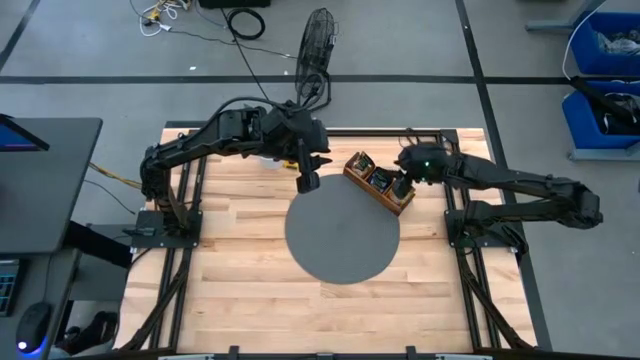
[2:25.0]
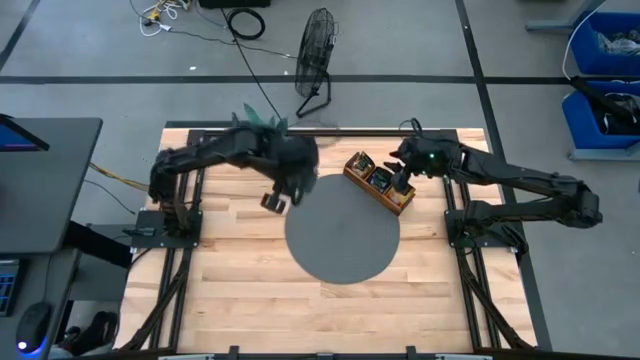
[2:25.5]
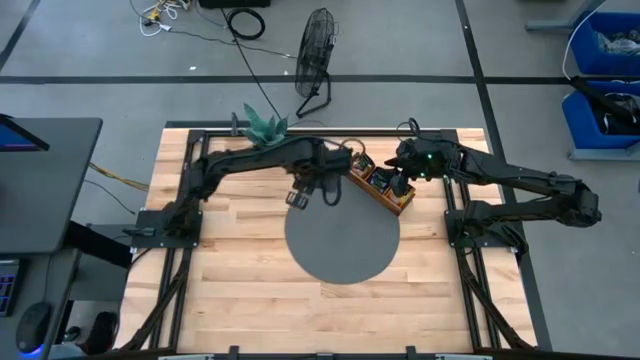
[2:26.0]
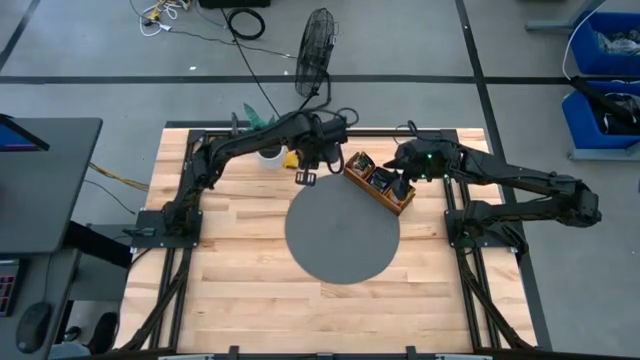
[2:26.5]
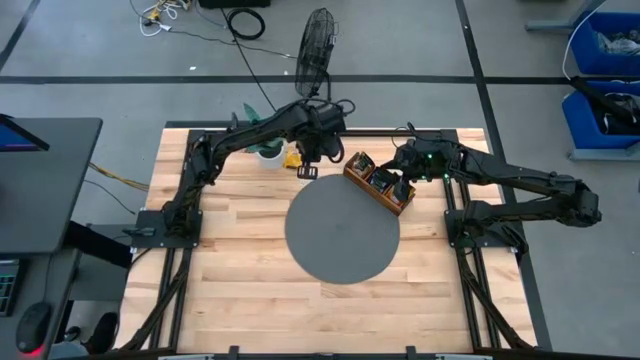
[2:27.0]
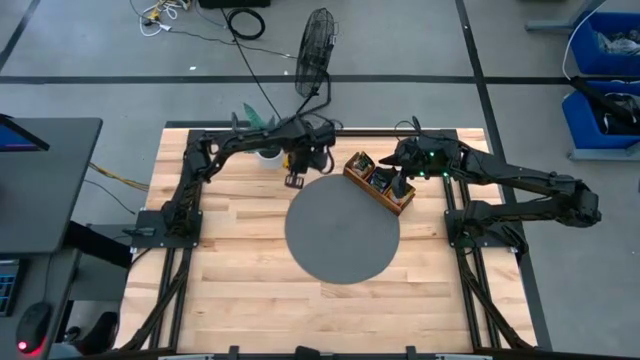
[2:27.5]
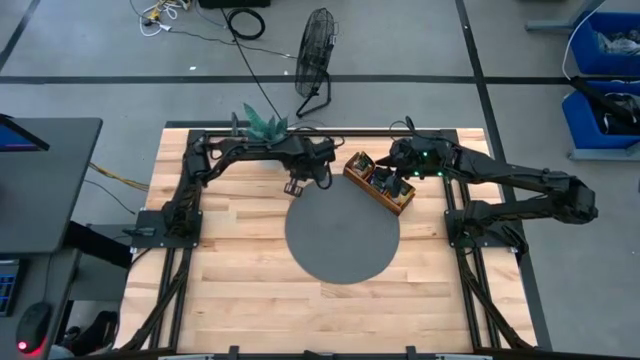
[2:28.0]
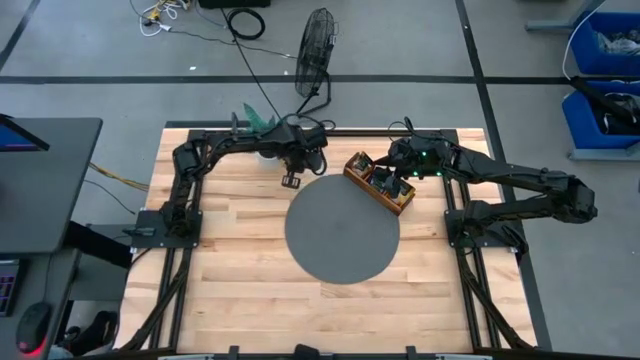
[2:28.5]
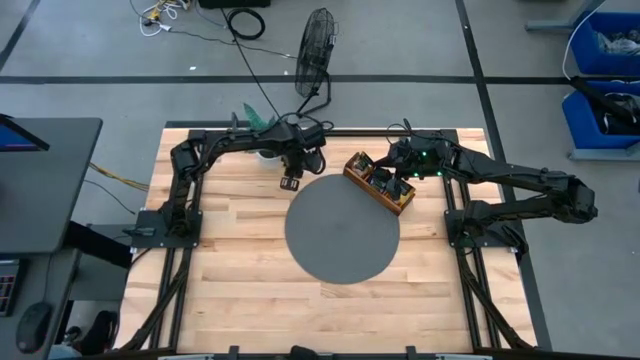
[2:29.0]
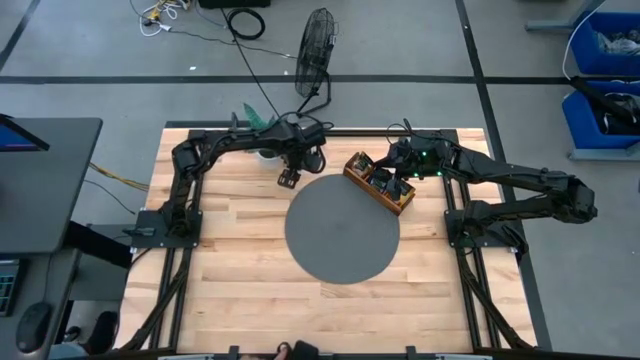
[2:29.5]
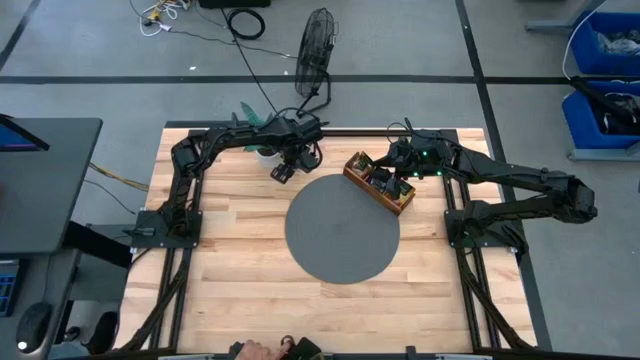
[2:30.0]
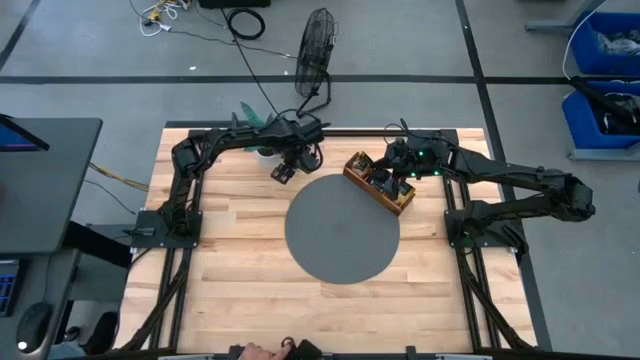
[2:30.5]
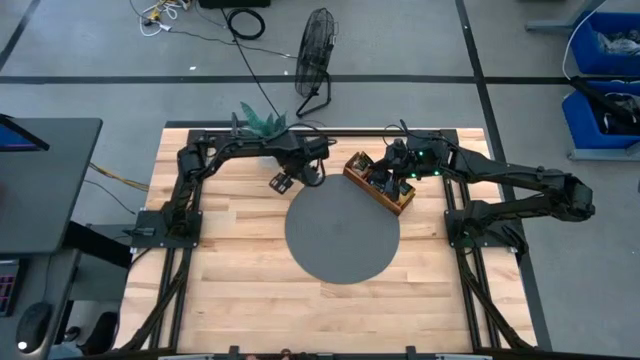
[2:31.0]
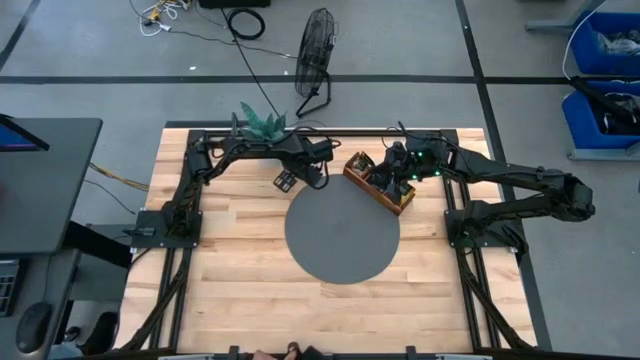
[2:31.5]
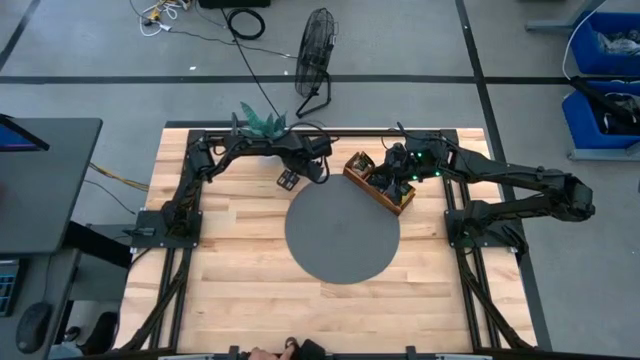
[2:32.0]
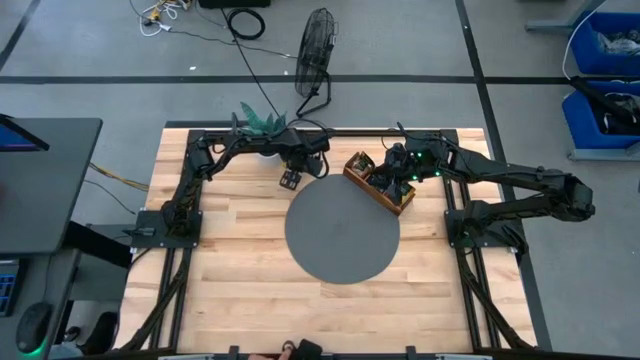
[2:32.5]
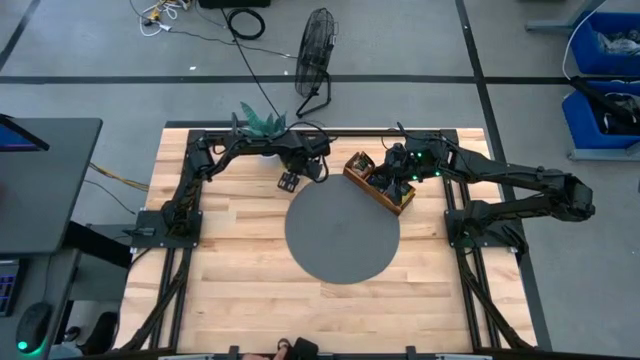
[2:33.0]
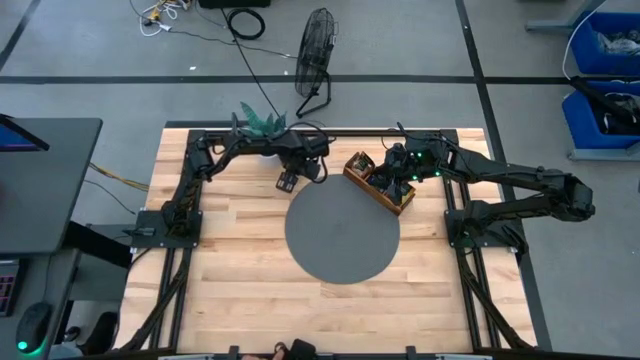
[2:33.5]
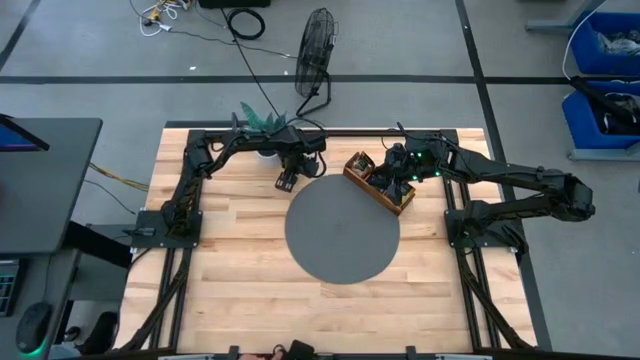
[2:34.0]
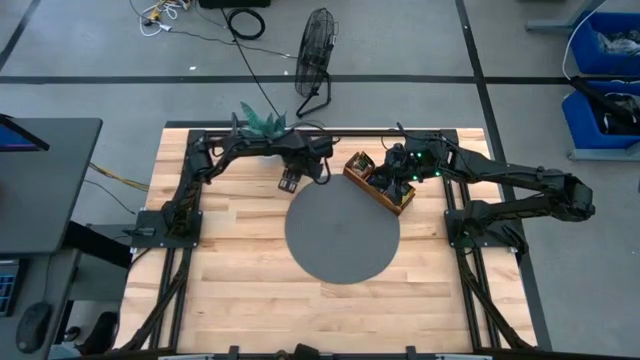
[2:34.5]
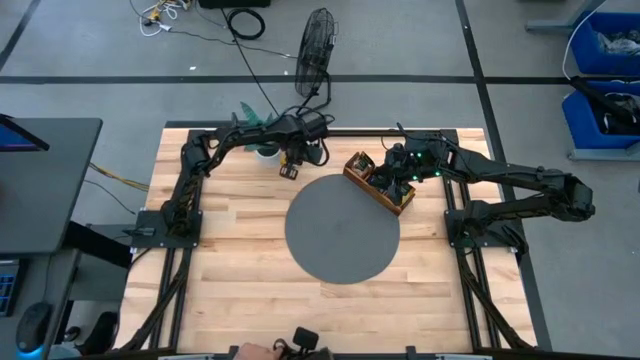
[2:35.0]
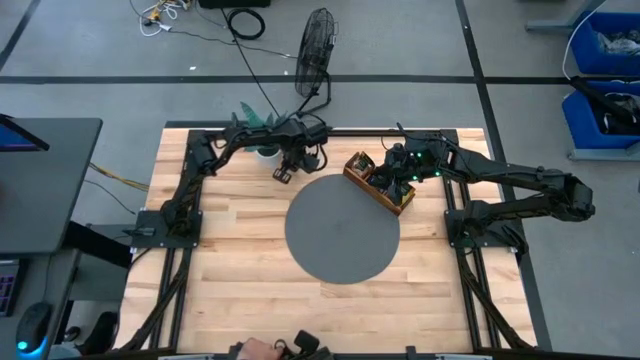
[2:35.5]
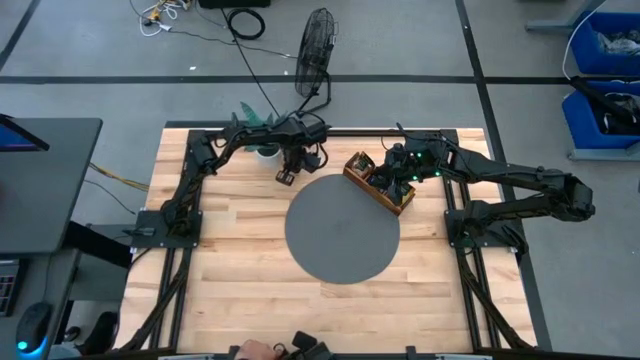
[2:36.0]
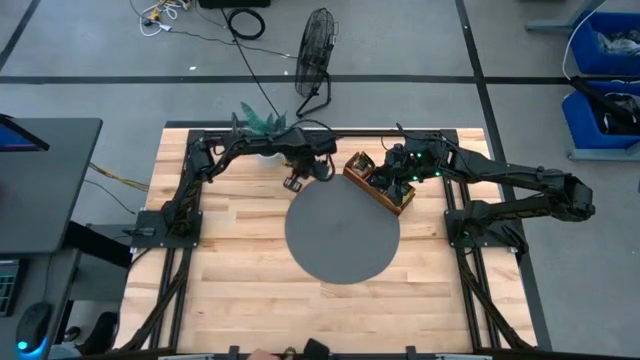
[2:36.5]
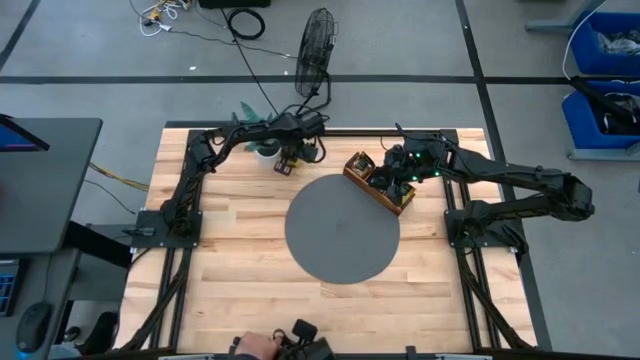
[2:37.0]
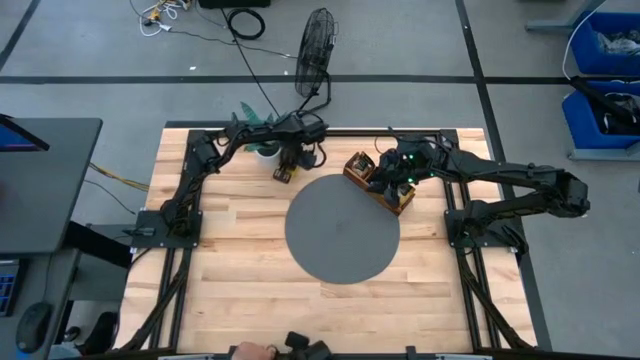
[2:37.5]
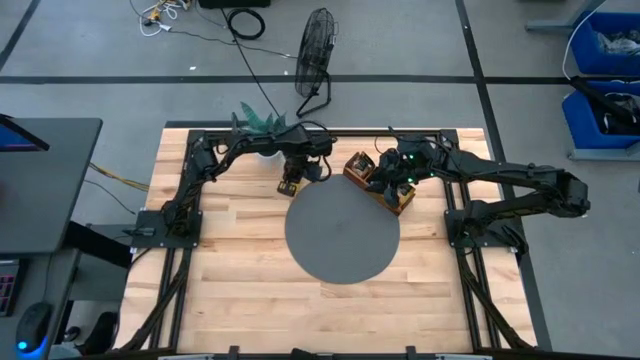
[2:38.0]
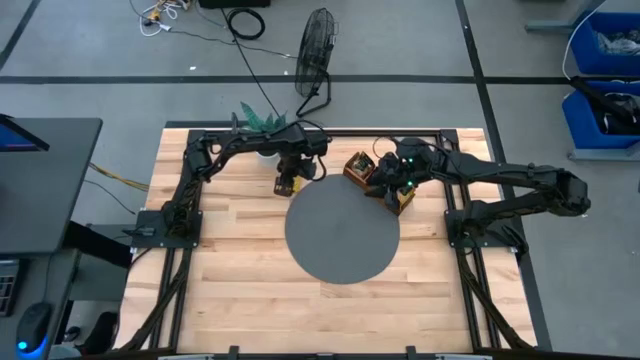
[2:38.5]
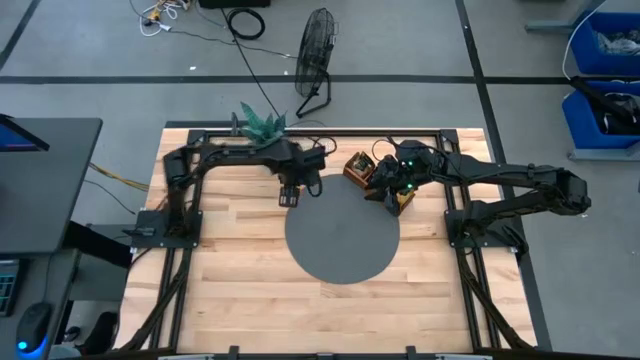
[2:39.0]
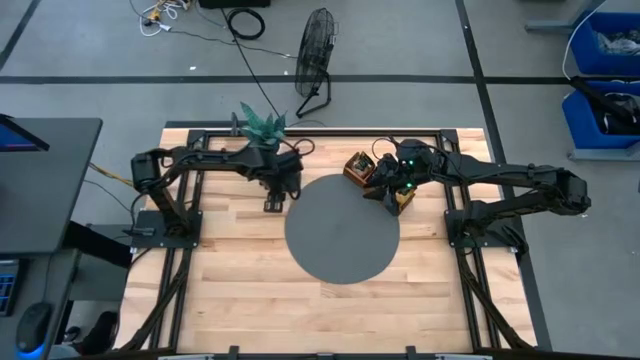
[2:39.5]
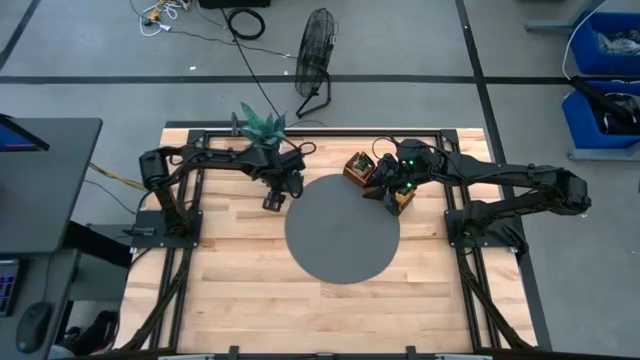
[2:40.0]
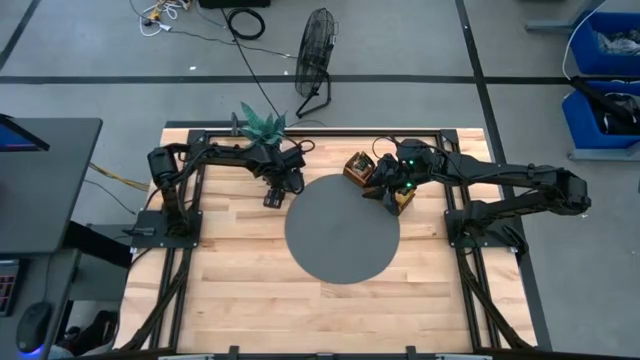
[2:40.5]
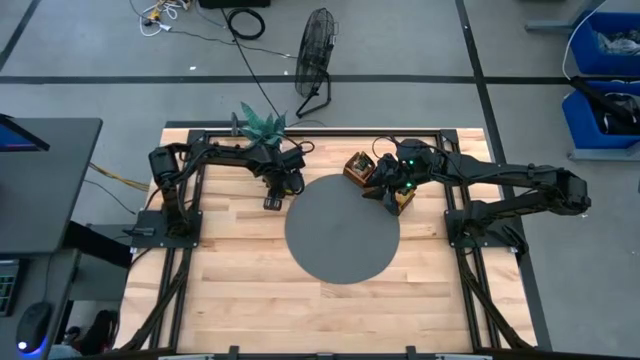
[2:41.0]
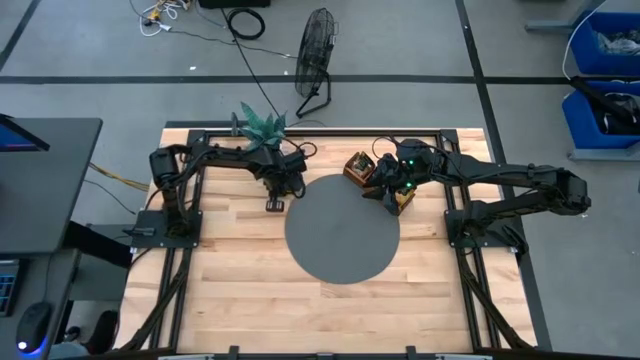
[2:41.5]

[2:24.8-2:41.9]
Task: Pick & Place Tea
Put the yellow tea bag into the right section of the wooden organizer
